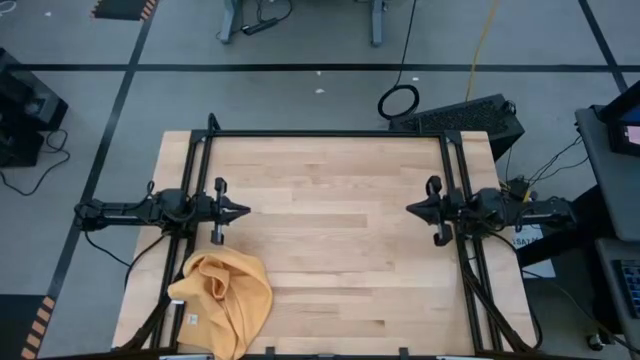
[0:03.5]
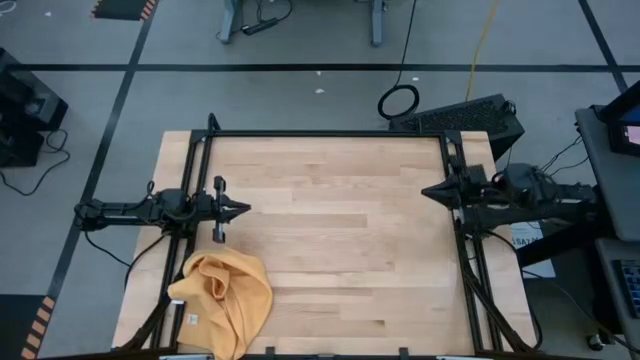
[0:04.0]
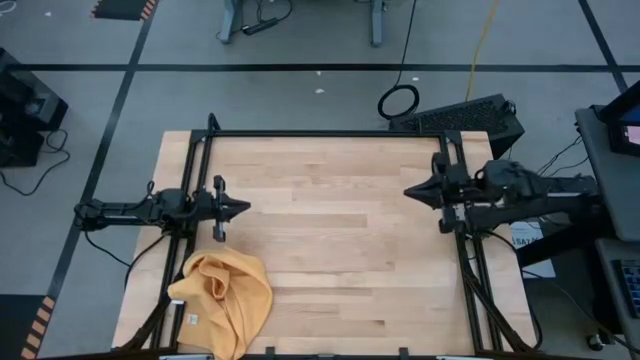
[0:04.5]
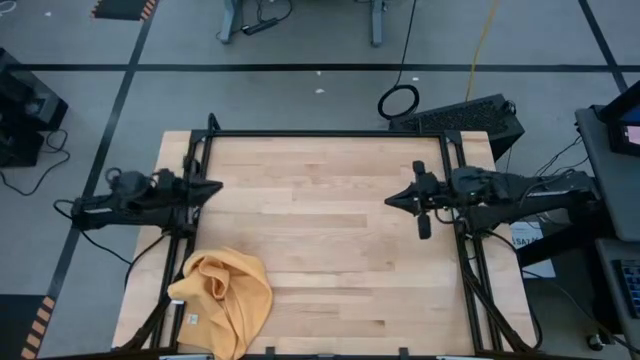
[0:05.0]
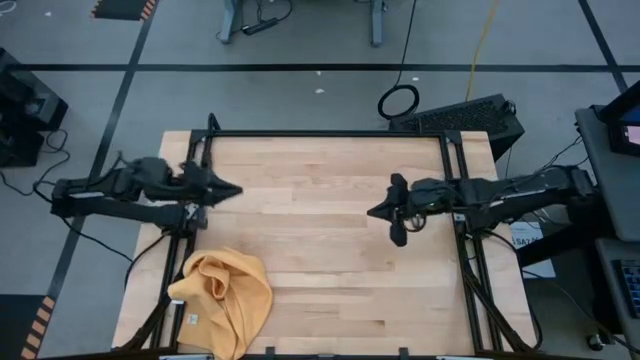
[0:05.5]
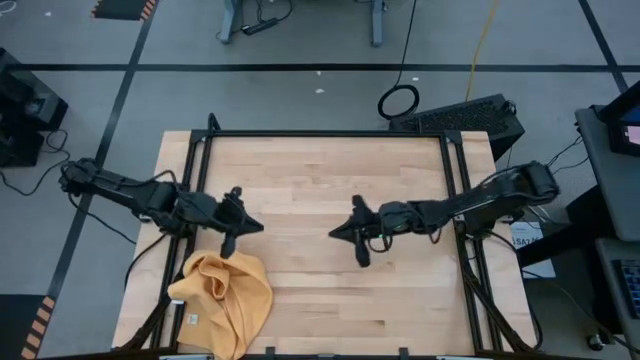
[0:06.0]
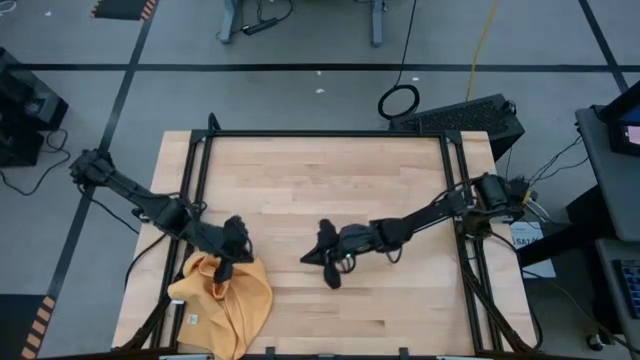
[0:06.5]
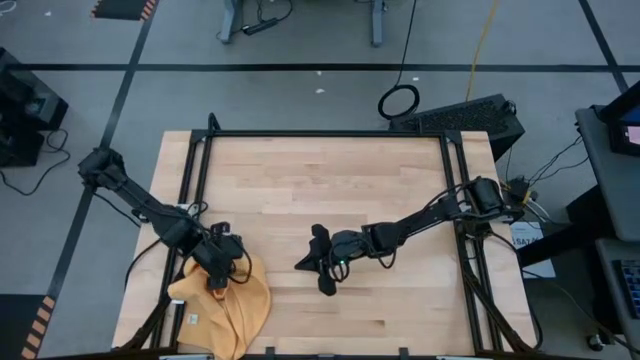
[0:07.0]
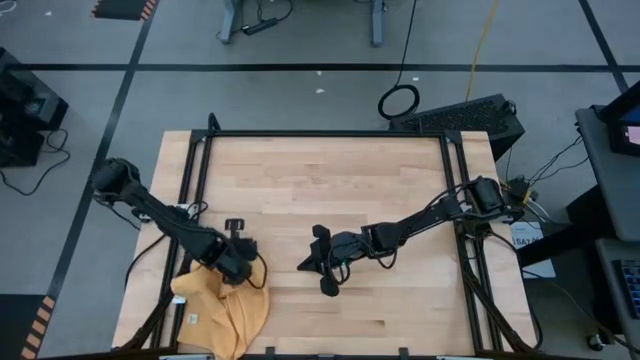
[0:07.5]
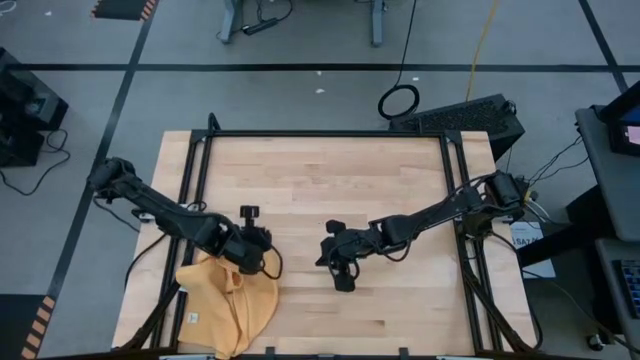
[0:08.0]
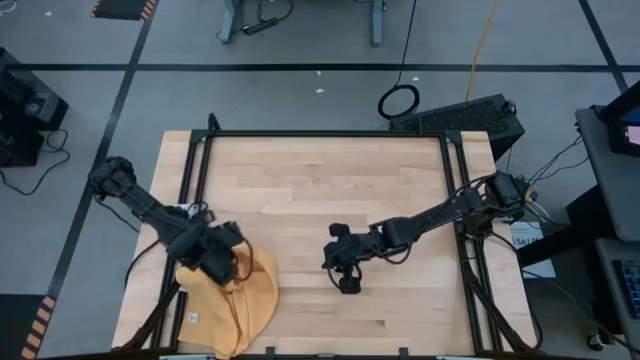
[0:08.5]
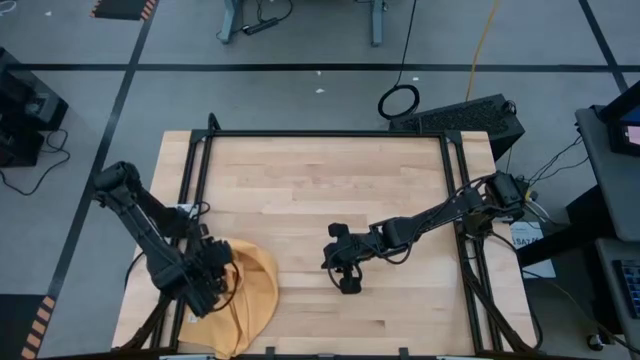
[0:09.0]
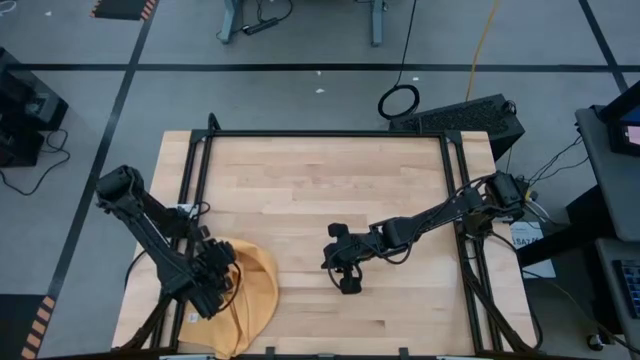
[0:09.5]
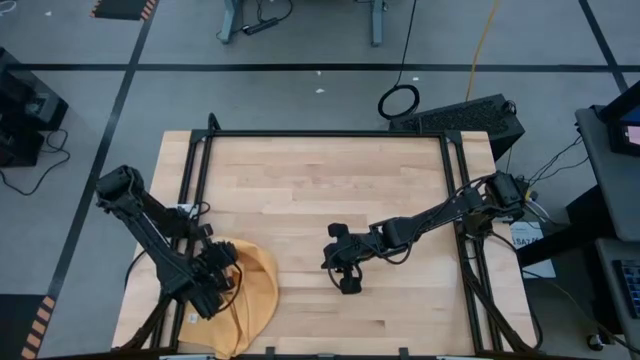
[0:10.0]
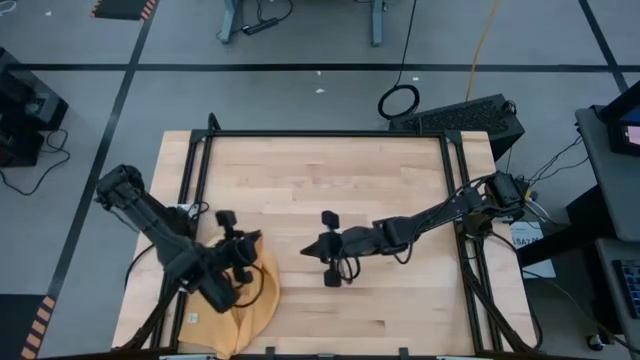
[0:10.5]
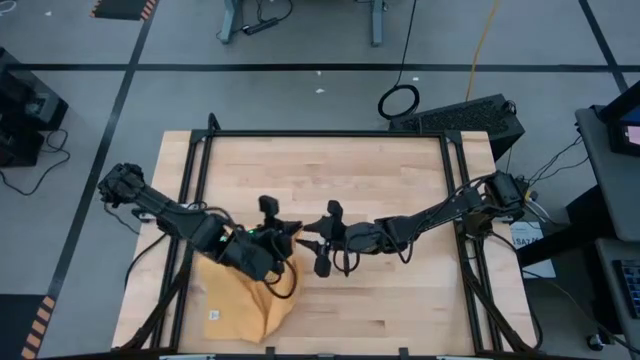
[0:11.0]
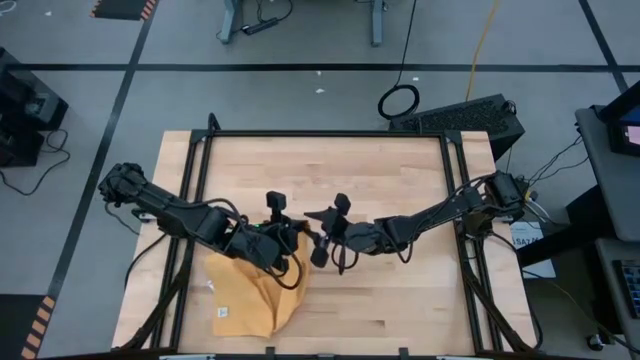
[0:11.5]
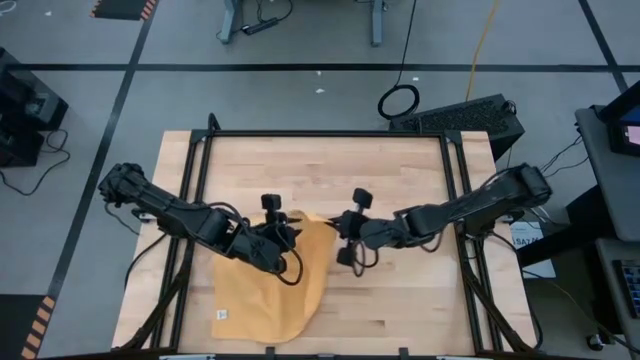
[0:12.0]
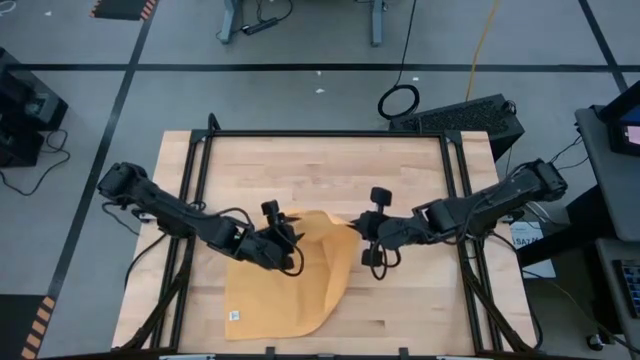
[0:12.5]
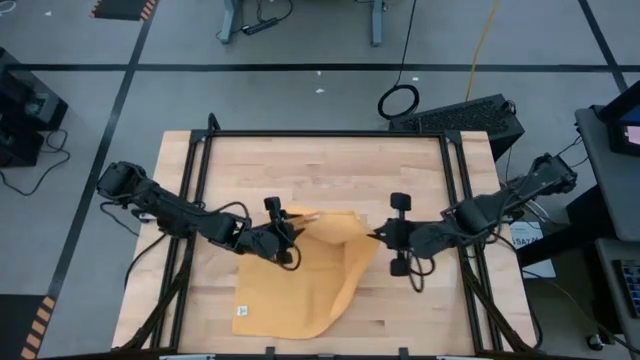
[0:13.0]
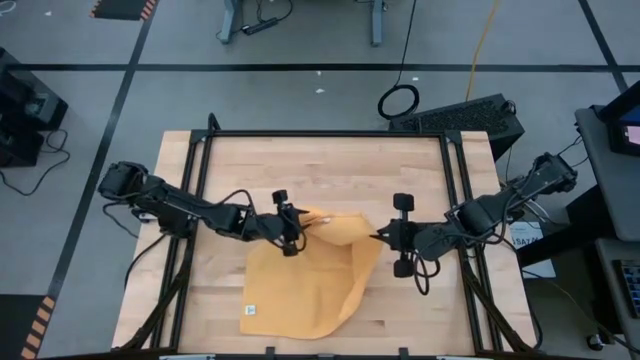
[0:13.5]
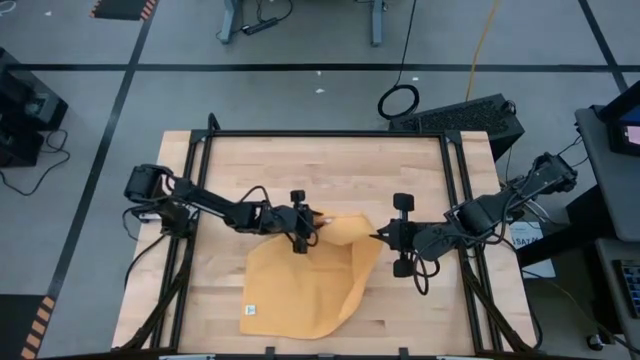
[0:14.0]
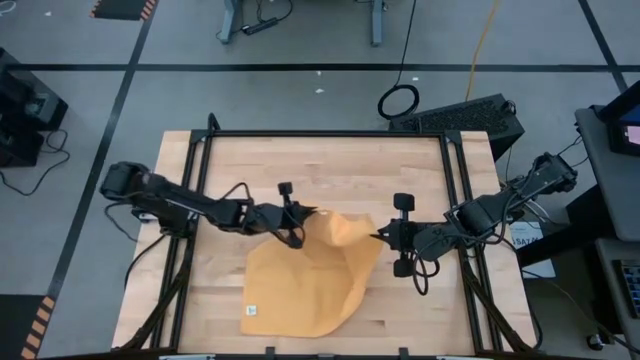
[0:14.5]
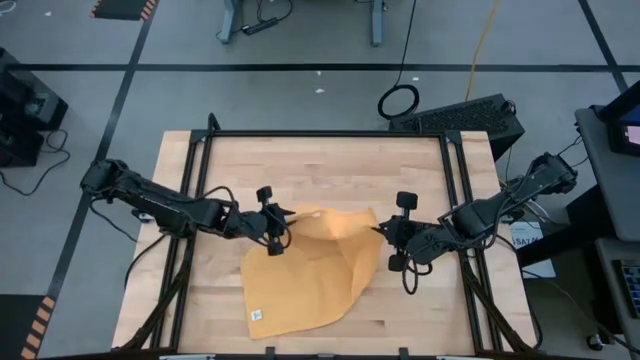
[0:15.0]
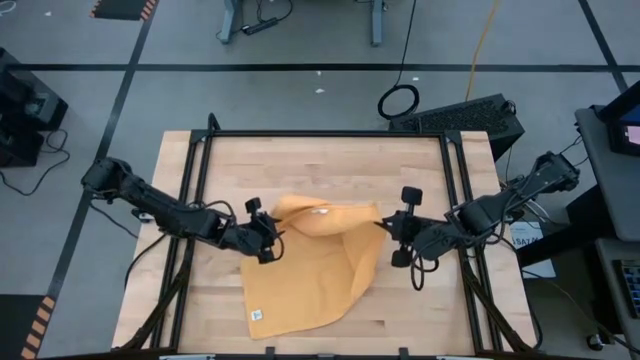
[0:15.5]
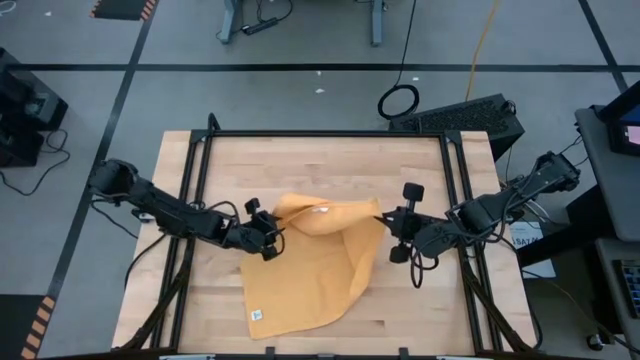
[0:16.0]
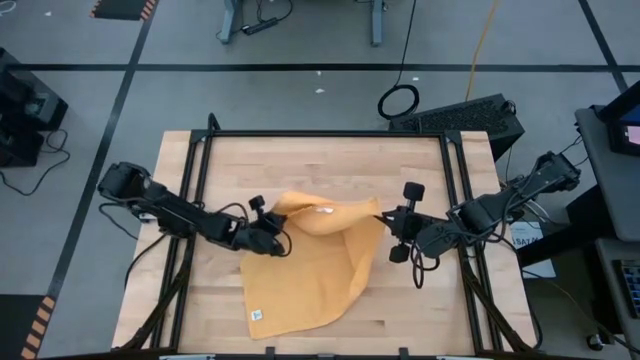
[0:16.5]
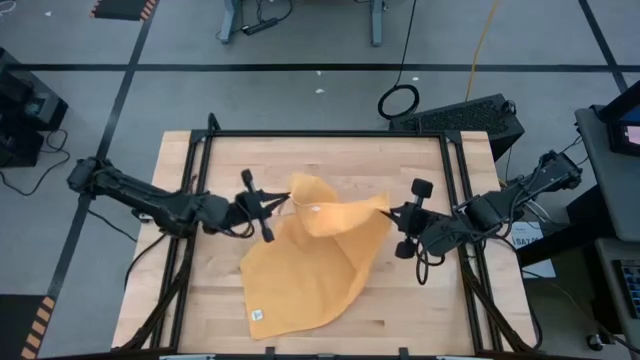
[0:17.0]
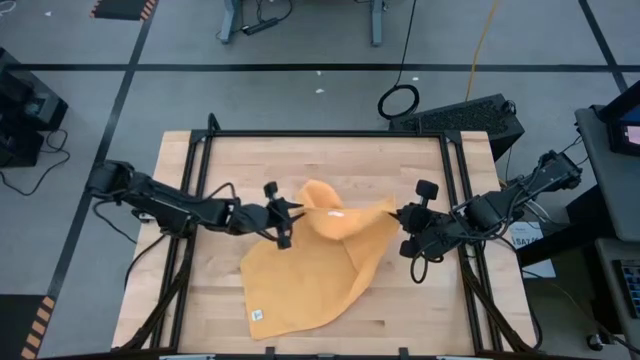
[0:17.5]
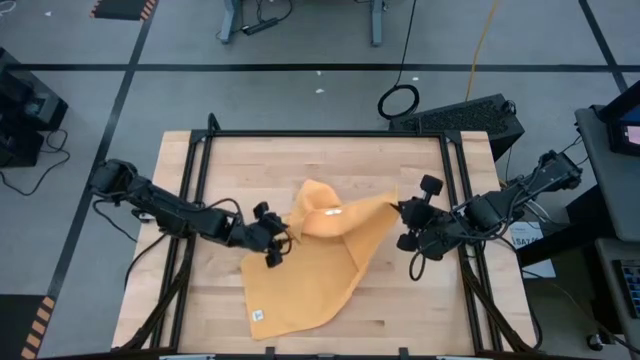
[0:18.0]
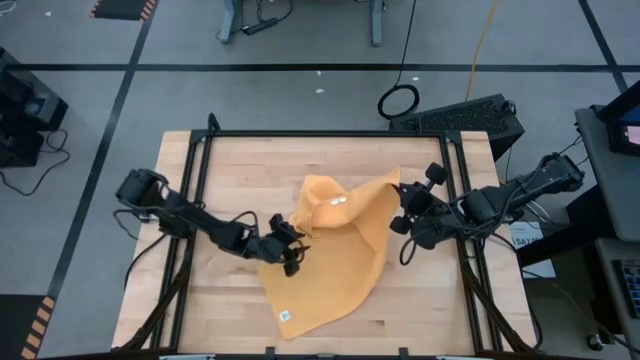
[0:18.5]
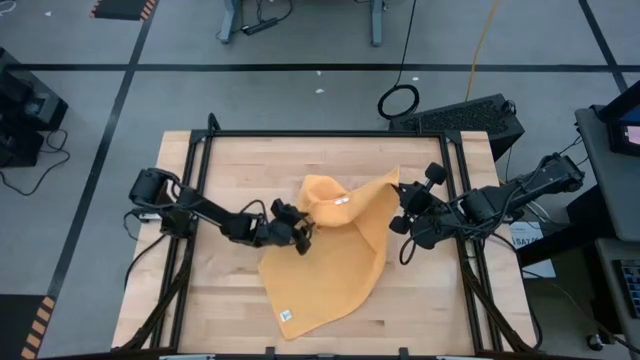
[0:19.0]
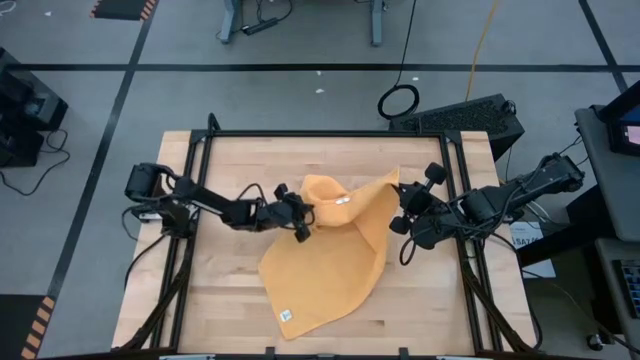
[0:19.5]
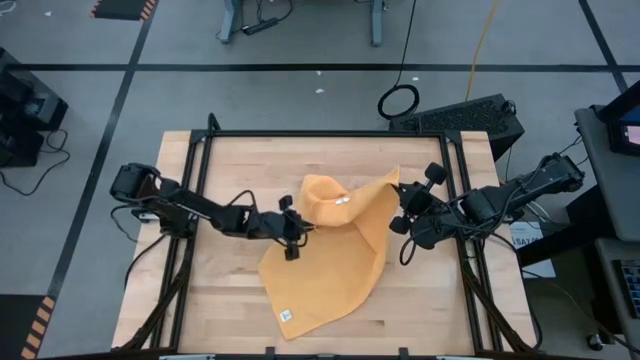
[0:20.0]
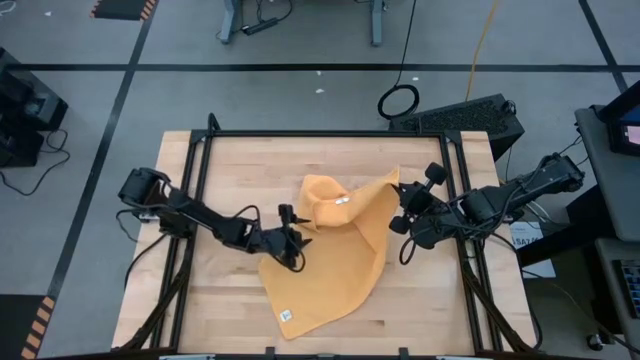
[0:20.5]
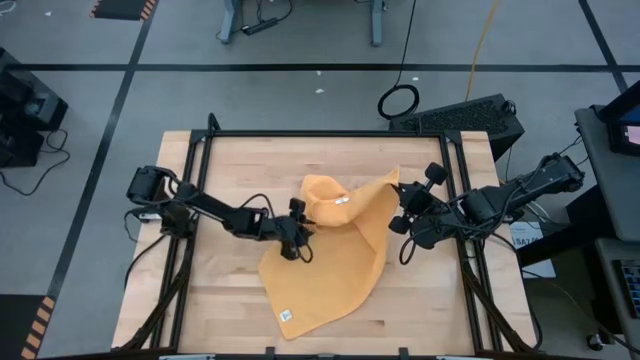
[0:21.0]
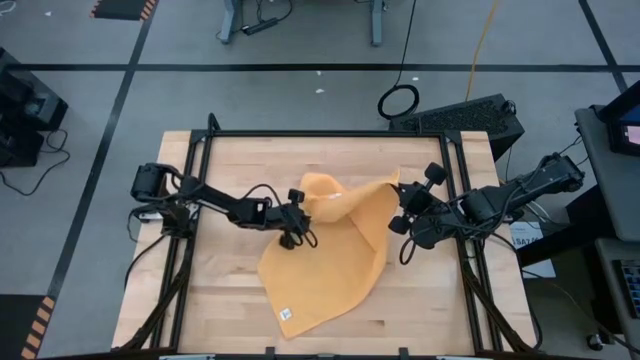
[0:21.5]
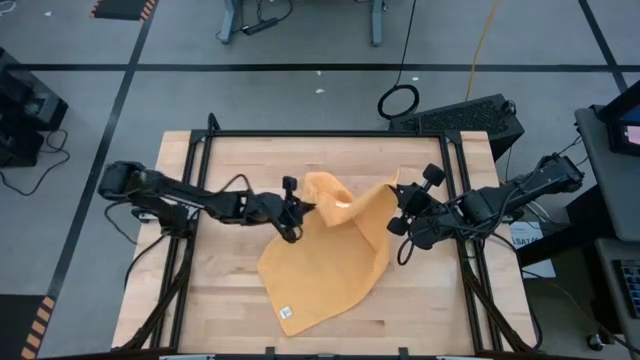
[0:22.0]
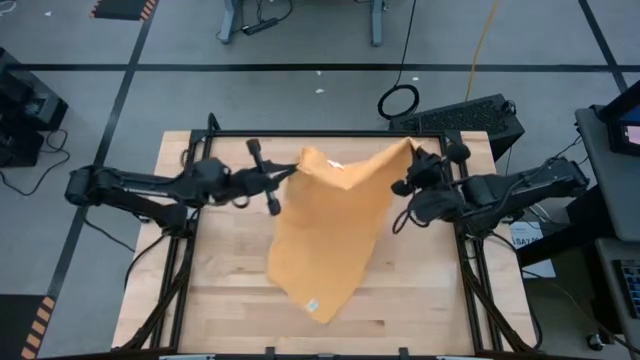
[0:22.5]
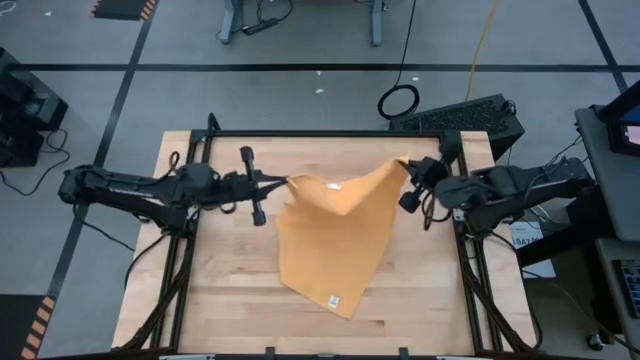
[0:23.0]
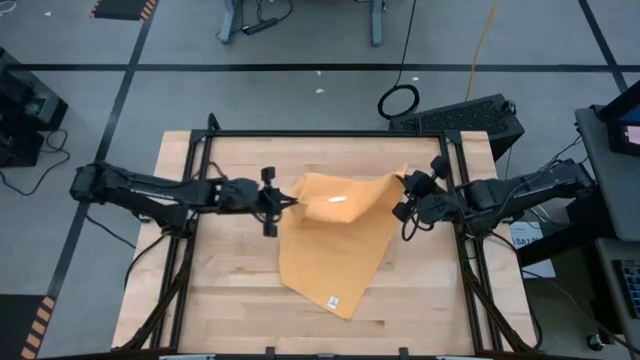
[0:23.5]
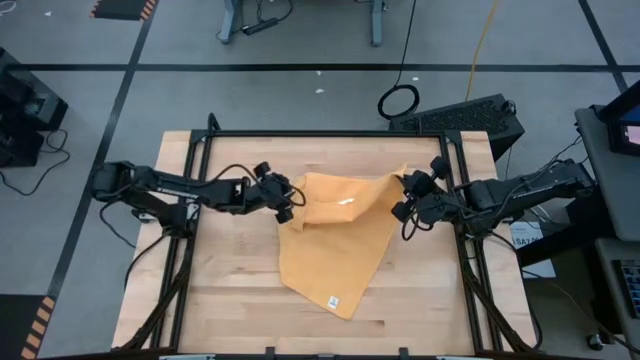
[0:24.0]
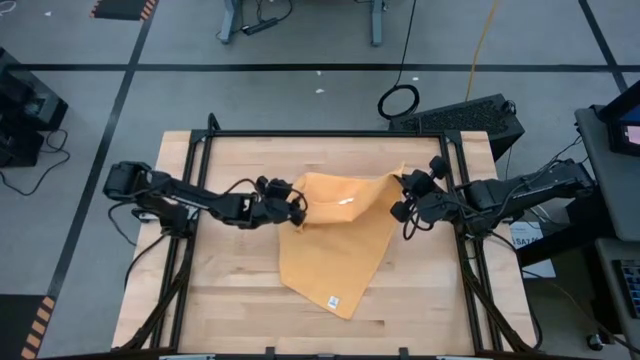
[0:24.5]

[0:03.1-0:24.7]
Task: Roll towel
Fold the yellow towel in
